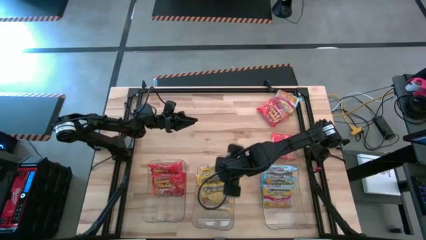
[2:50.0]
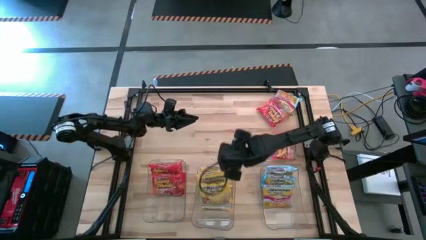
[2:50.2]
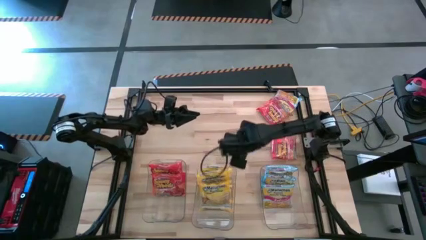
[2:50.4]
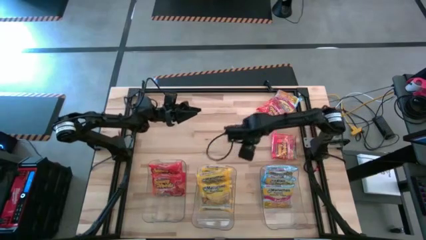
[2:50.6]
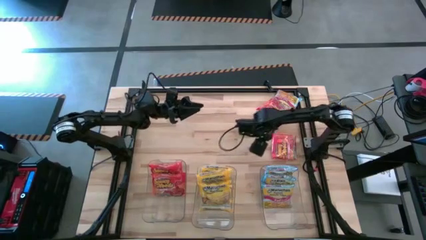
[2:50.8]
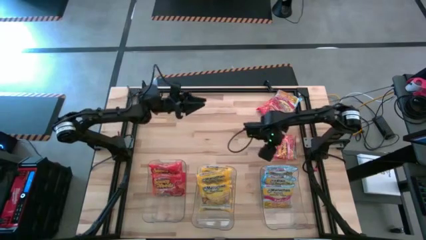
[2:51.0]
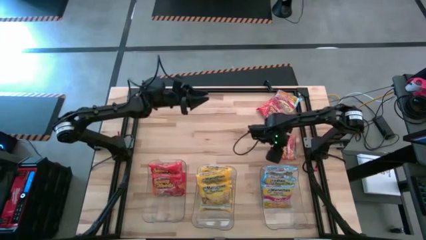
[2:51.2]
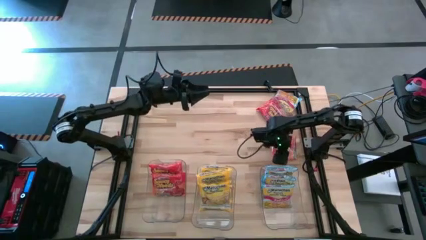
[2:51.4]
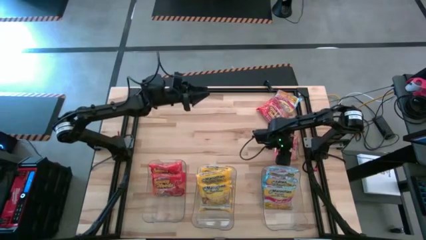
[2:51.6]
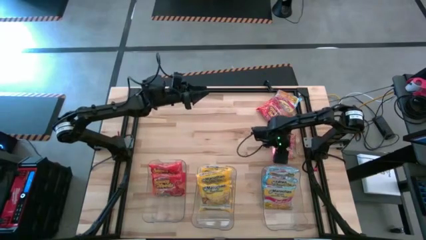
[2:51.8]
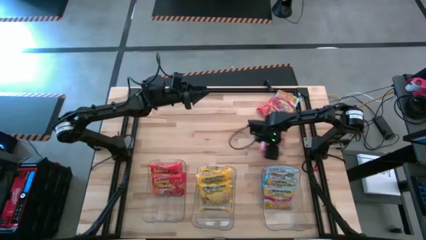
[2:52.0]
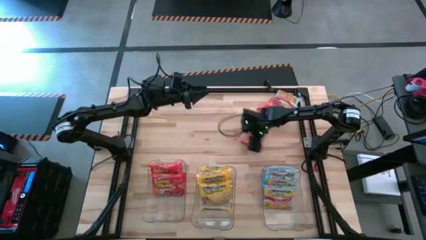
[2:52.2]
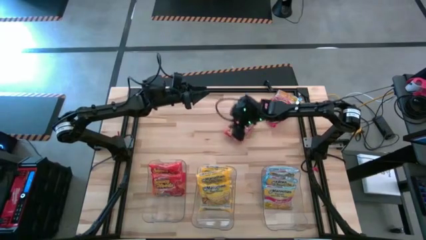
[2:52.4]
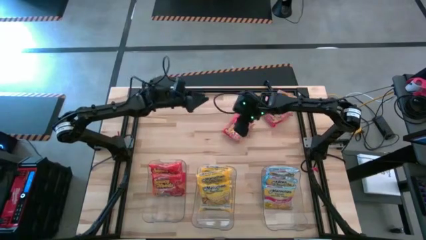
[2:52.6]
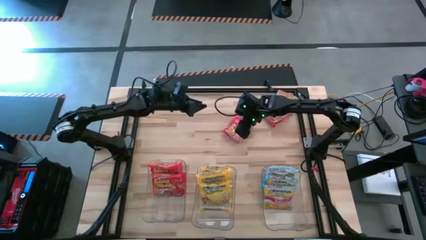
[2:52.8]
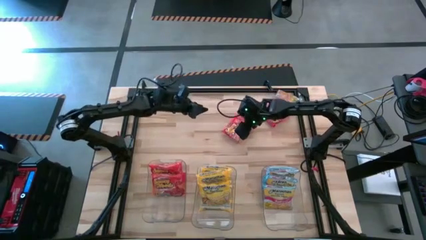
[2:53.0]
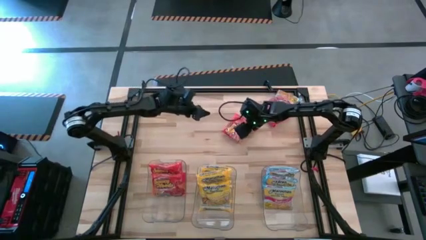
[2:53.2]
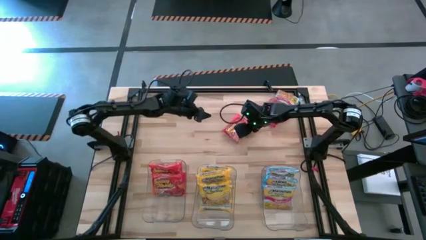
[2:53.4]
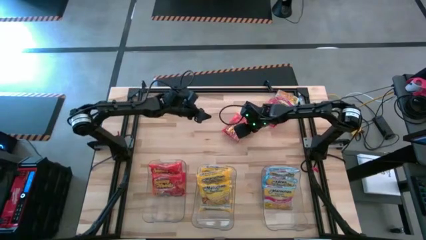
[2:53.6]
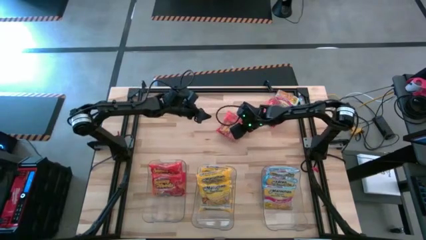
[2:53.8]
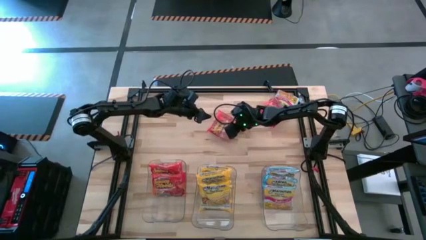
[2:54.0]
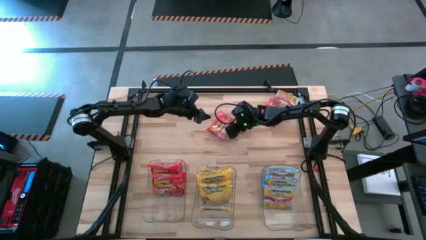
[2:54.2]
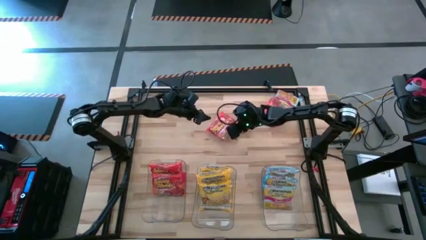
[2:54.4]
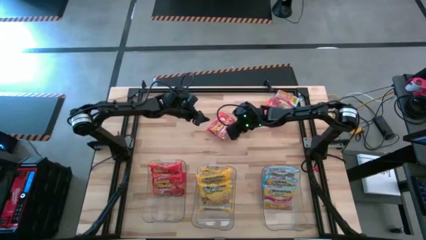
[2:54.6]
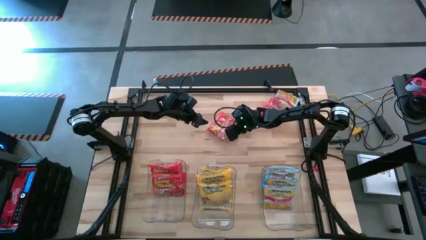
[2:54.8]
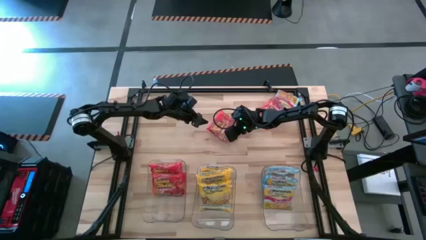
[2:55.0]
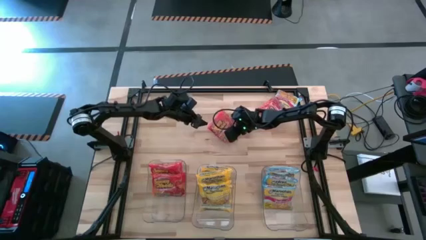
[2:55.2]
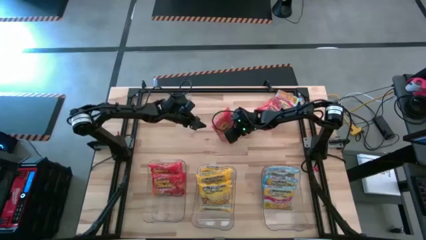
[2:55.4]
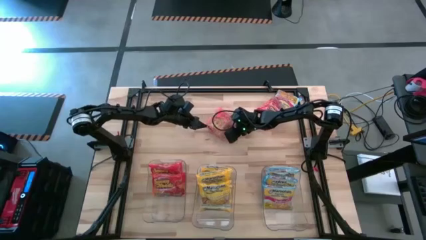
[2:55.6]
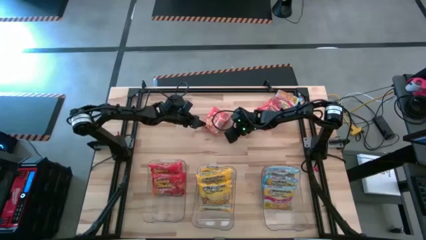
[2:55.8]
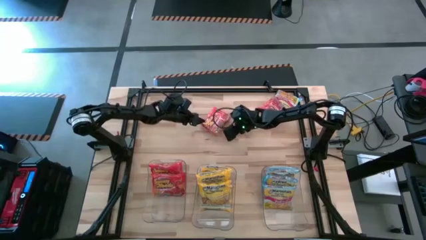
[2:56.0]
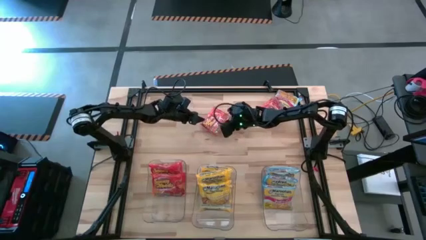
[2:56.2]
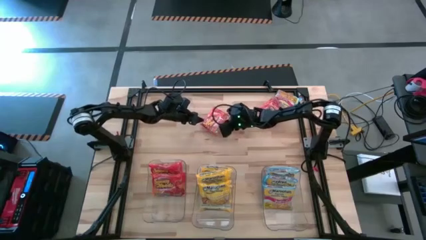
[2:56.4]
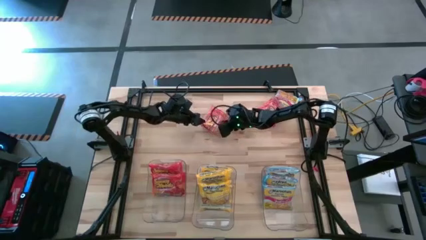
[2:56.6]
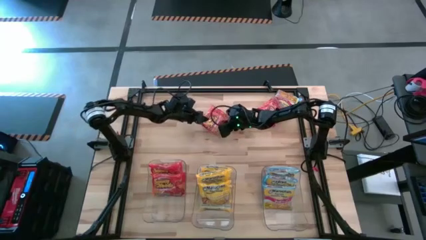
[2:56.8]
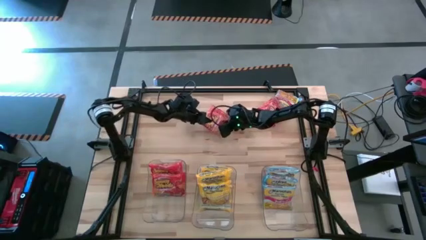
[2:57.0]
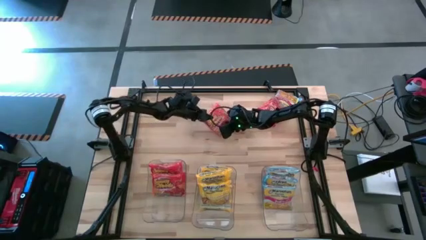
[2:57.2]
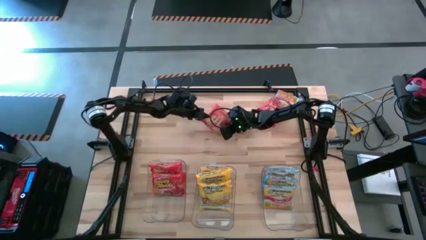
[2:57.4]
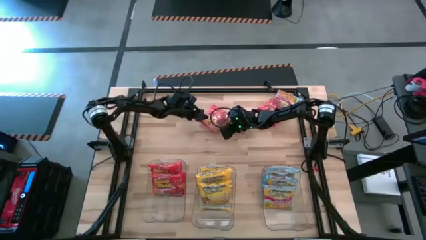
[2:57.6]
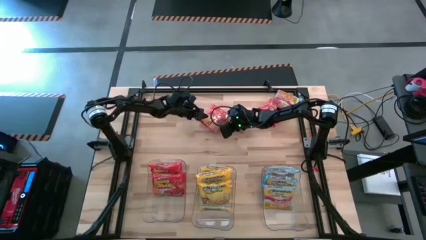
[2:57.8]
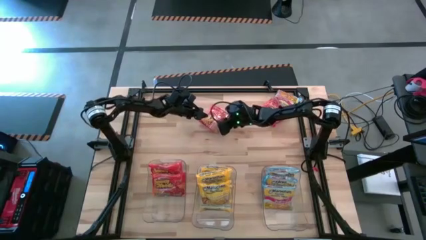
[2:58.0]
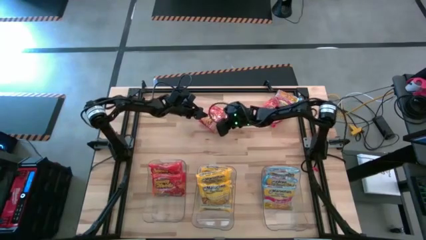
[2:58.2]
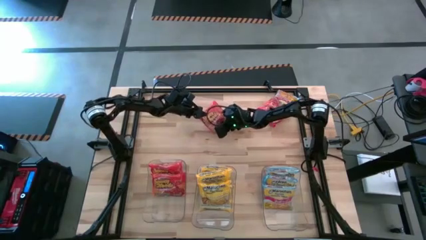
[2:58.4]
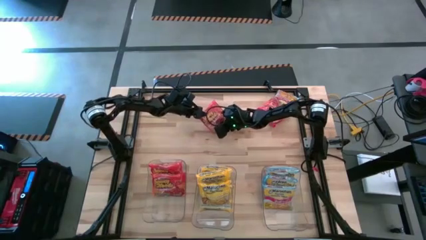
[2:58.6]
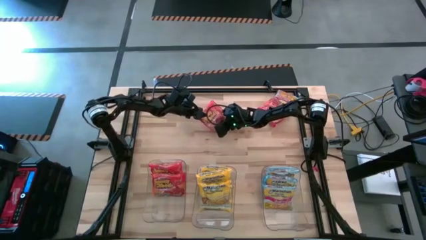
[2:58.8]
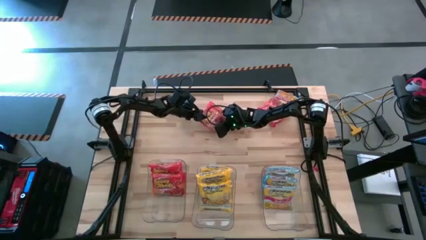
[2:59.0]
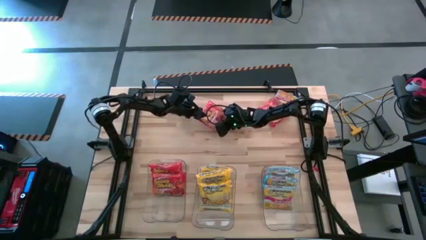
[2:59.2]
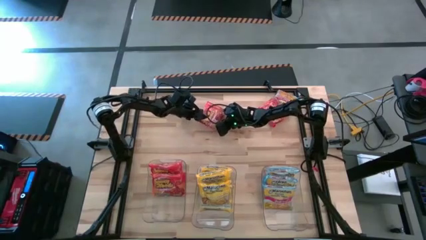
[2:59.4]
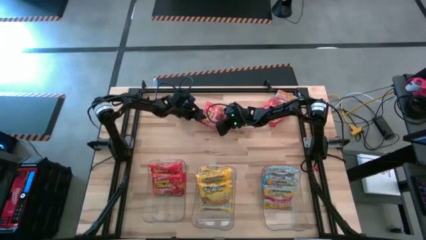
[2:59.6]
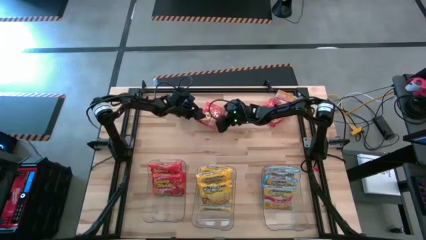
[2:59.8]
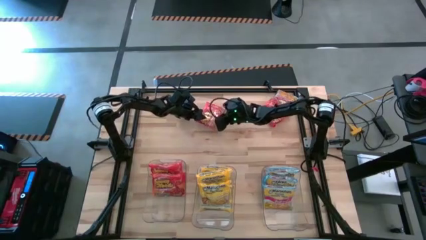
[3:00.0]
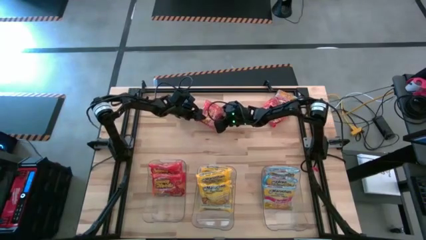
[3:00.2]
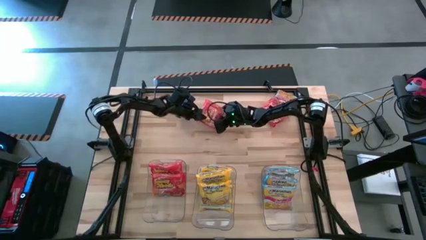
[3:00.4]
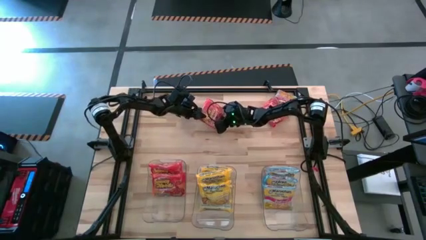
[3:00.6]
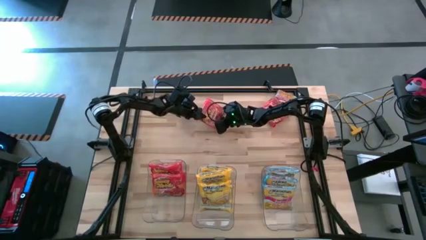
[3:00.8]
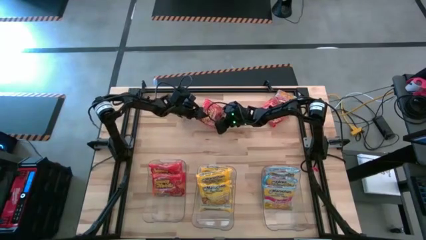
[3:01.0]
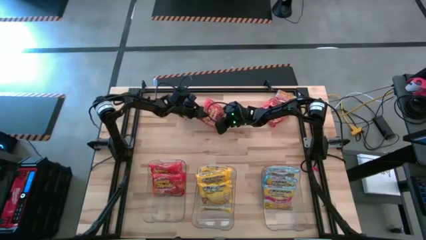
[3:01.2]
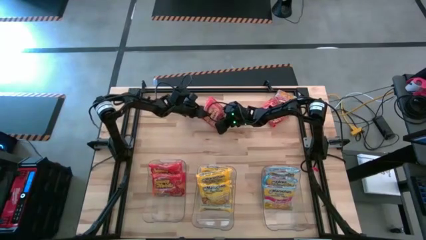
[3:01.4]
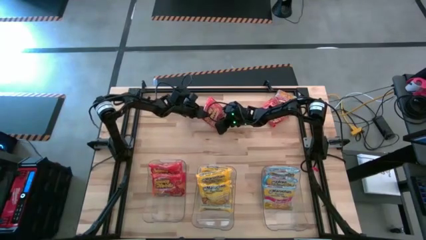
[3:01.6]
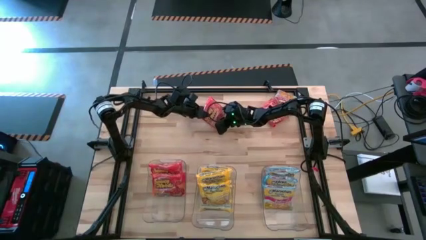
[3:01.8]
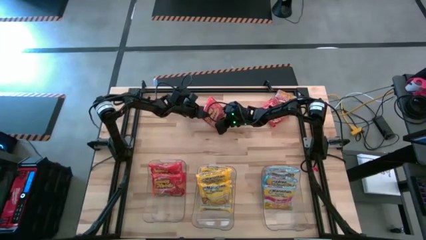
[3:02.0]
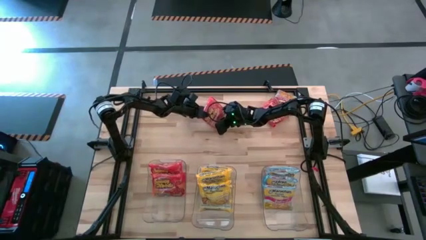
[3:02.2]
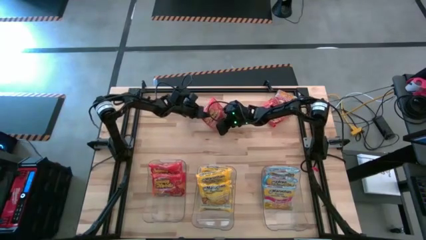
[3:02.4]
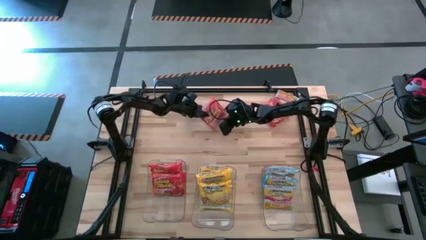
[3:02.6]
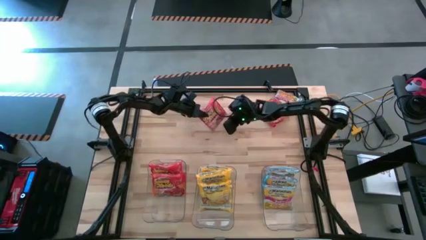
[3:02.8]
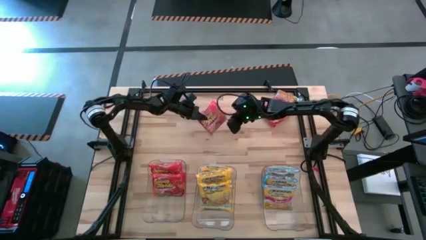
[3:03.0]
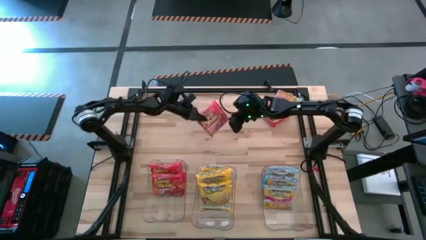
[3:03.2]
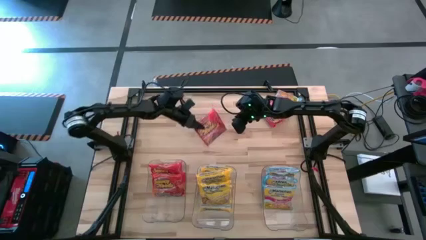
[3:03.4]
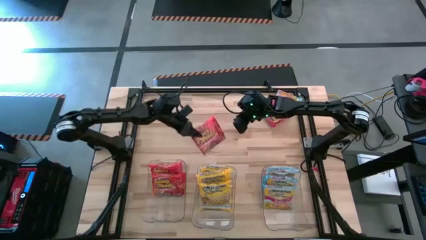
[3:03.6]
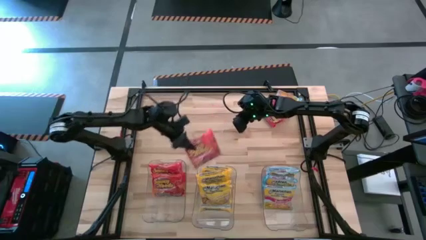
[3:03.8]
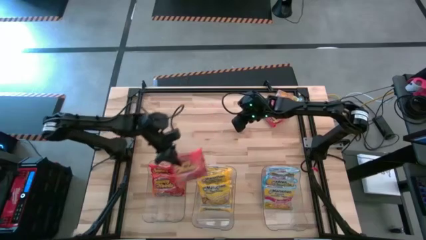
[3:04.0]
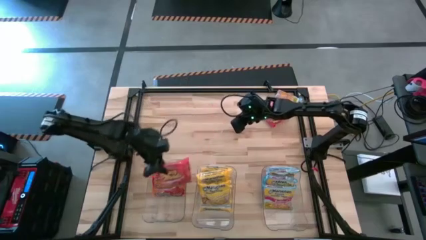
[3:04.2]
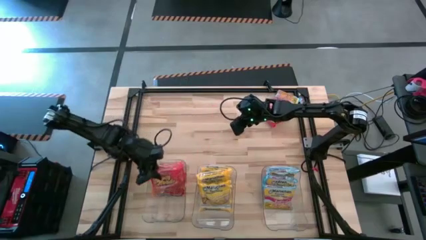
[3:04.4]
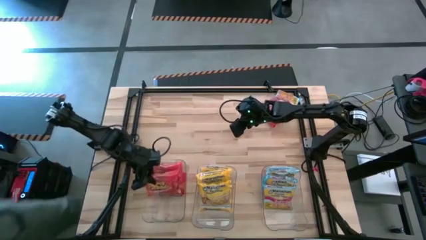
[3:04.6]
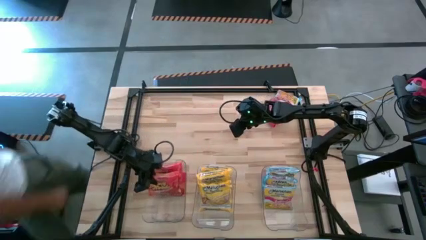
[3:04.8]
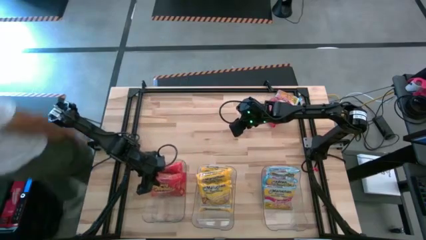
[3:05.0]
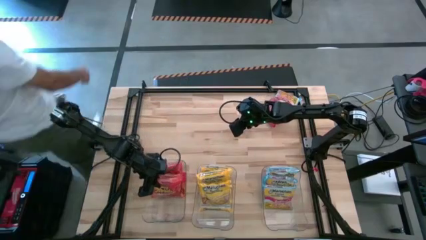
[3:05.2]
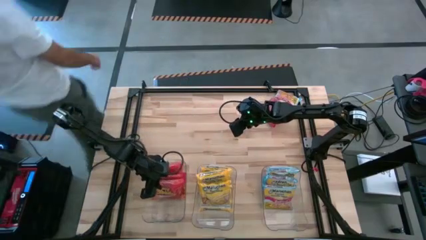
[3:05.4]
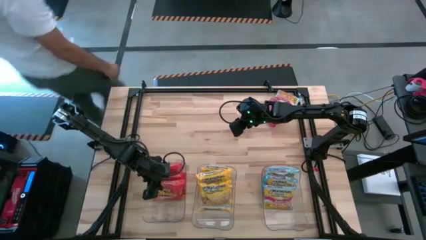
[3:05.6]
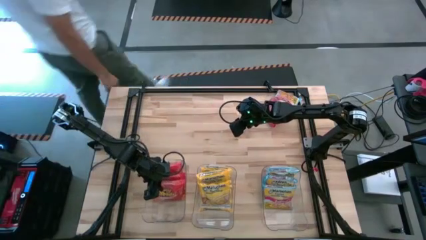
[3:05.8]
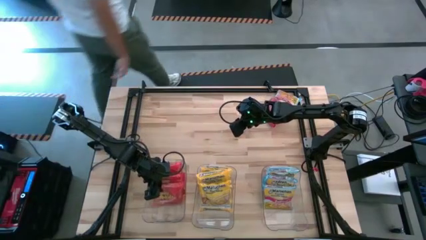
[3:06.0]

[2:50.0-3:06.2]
Task: Sort Maruchan noodles
Put the orange noodle pack into the left transparent bin
